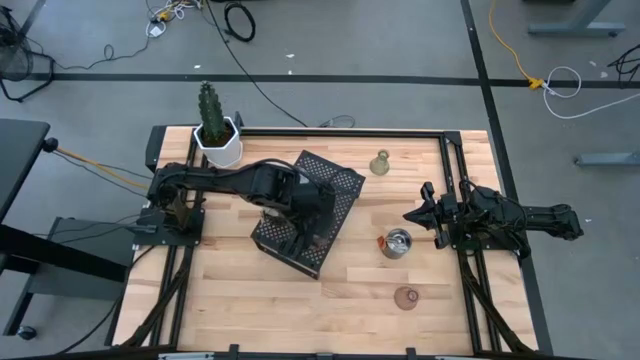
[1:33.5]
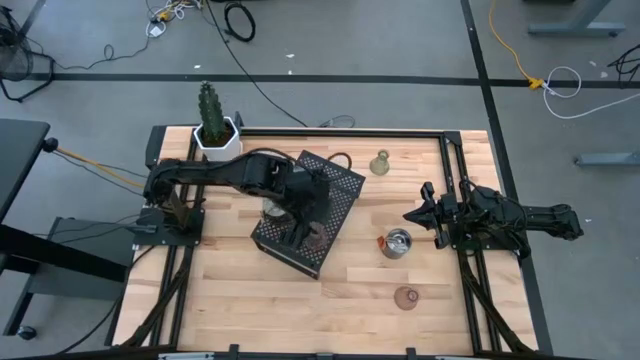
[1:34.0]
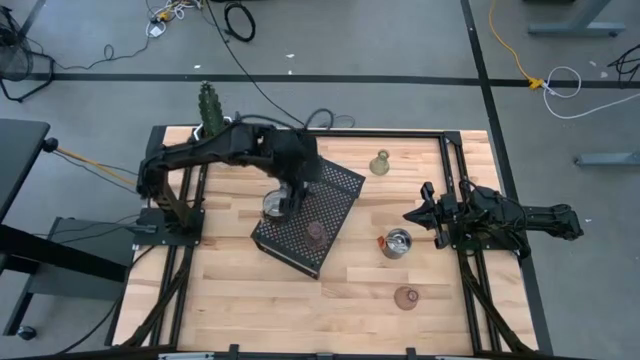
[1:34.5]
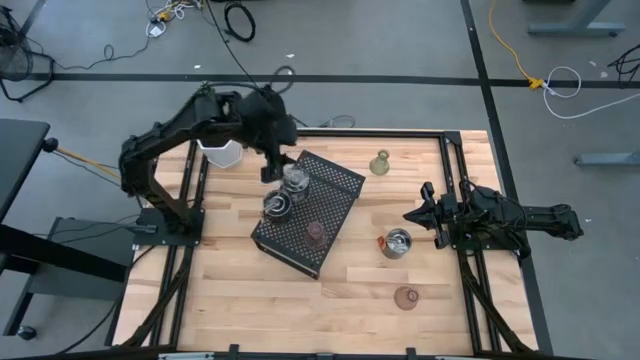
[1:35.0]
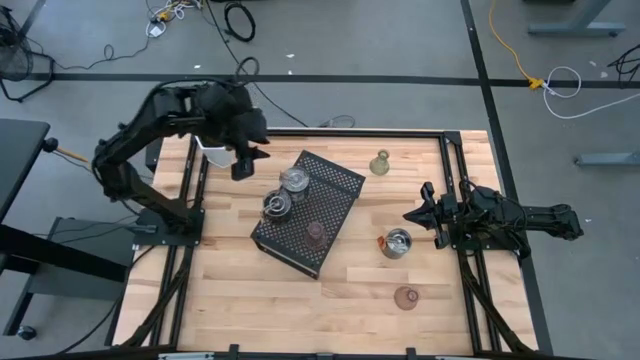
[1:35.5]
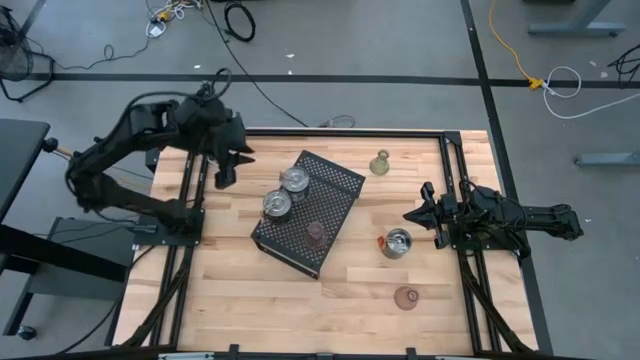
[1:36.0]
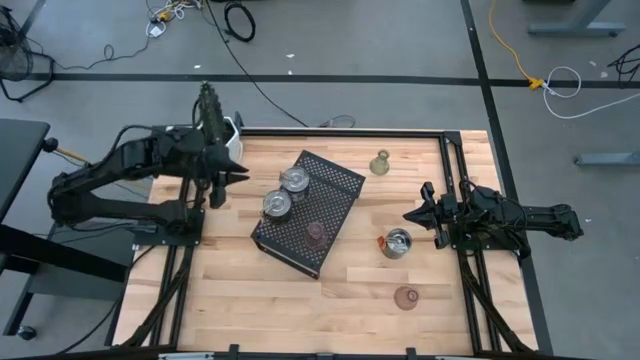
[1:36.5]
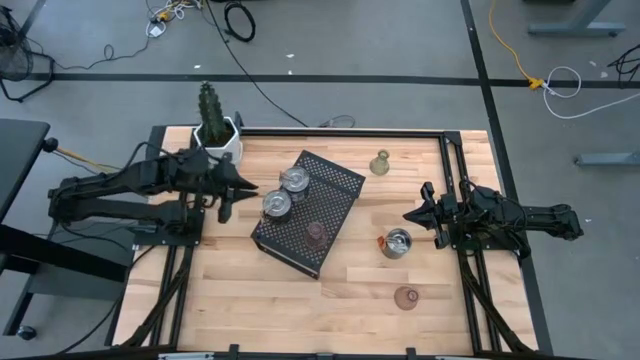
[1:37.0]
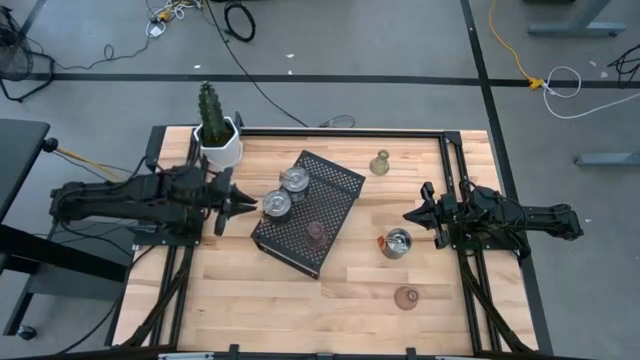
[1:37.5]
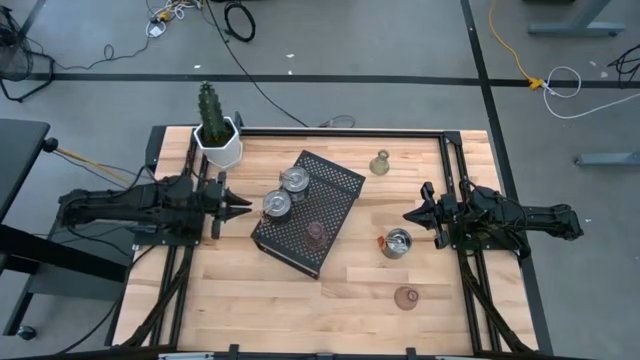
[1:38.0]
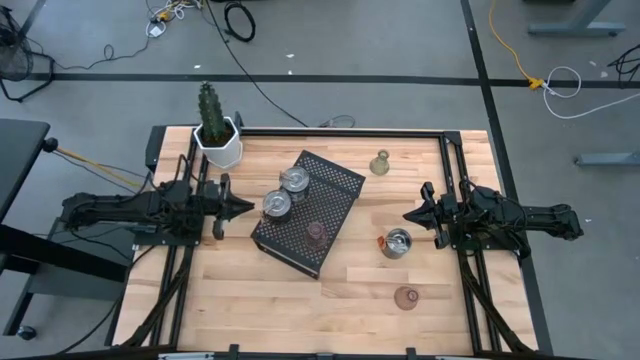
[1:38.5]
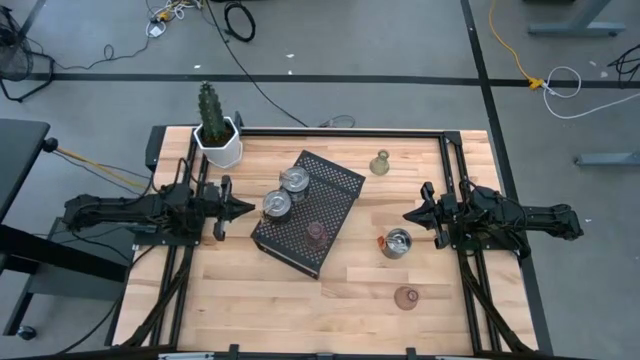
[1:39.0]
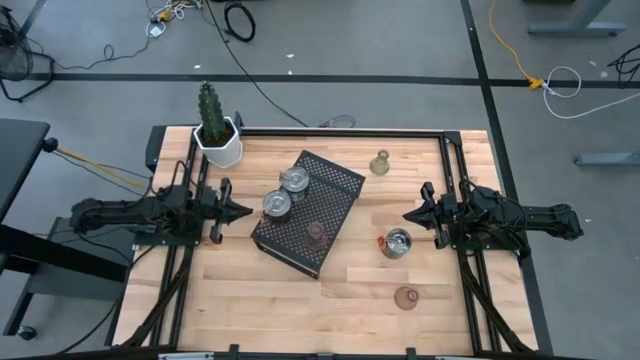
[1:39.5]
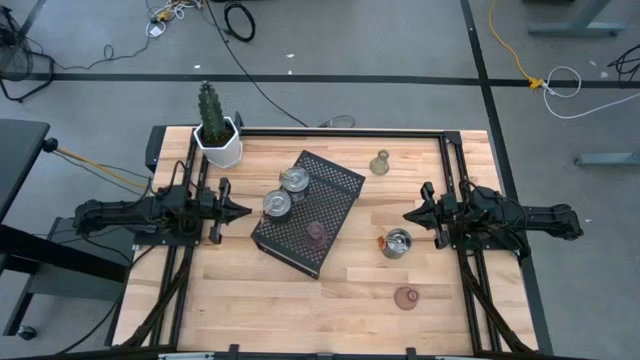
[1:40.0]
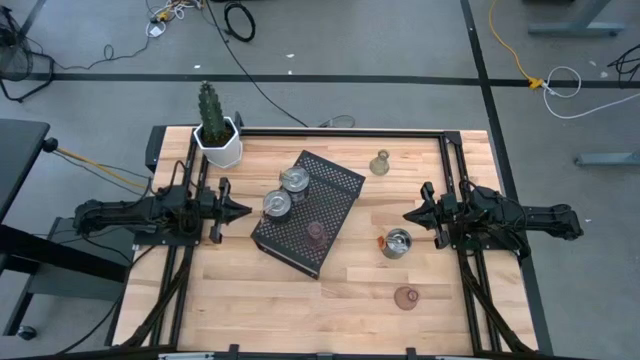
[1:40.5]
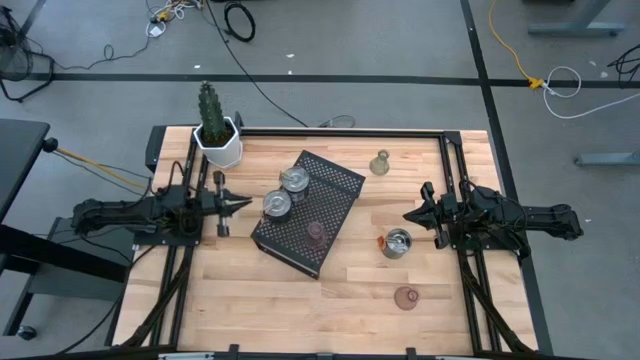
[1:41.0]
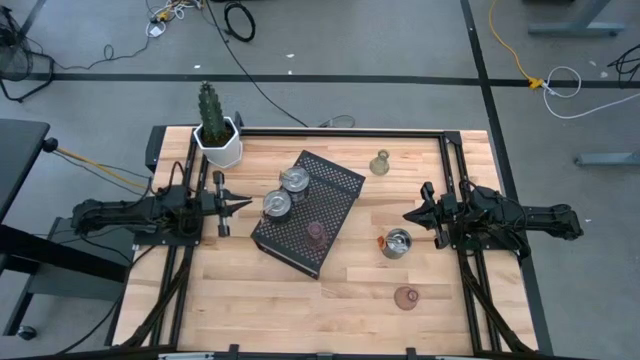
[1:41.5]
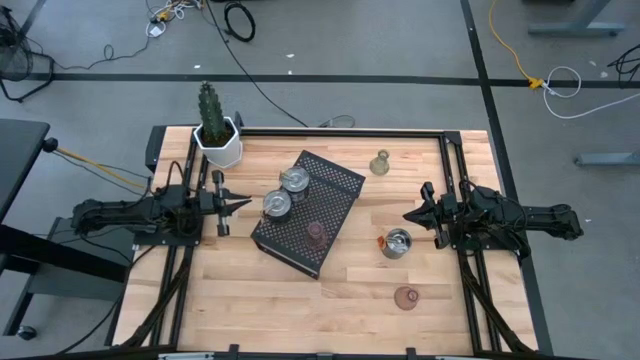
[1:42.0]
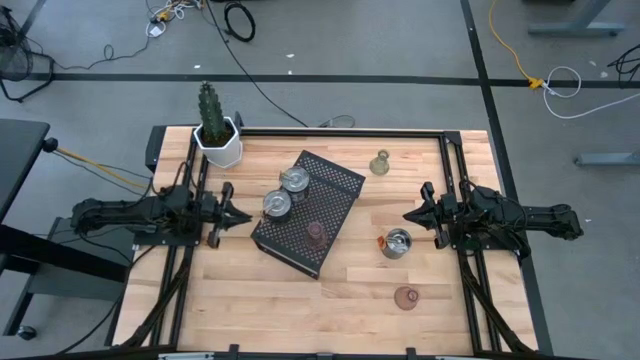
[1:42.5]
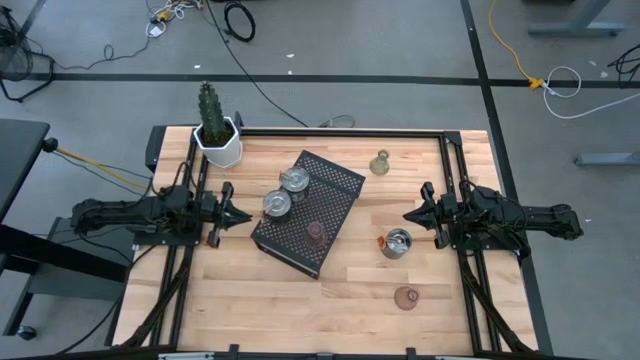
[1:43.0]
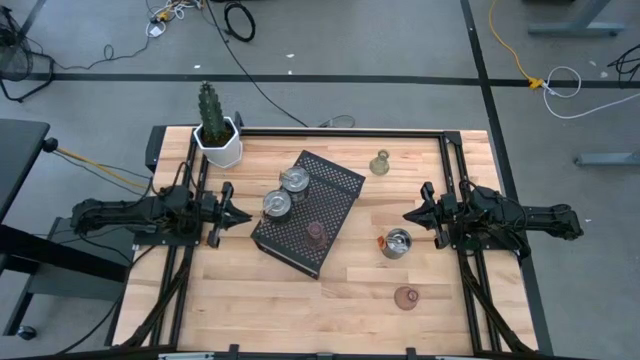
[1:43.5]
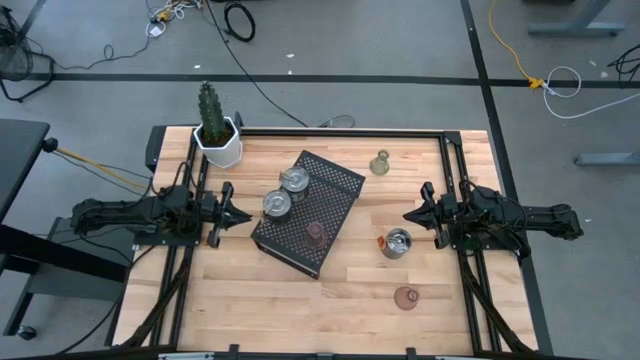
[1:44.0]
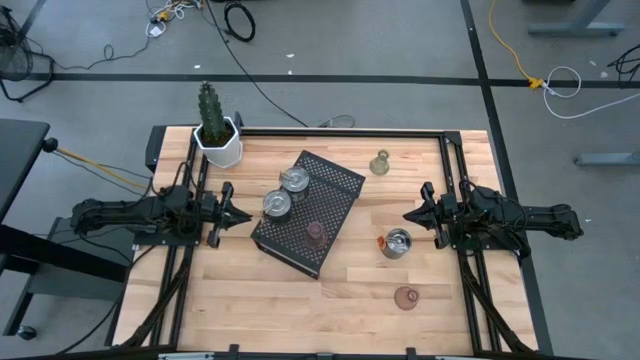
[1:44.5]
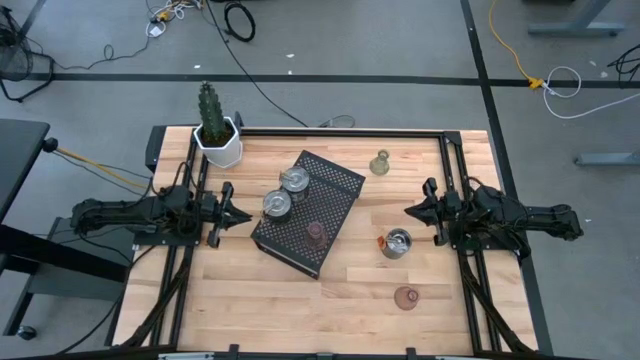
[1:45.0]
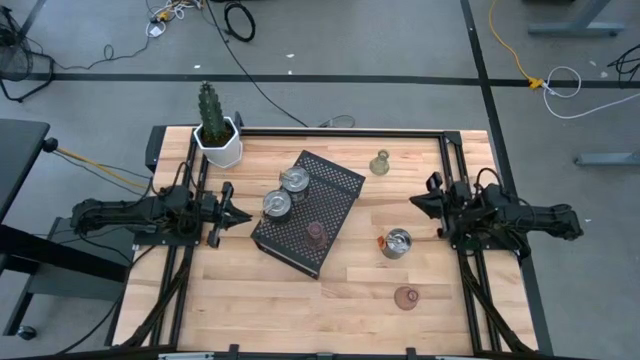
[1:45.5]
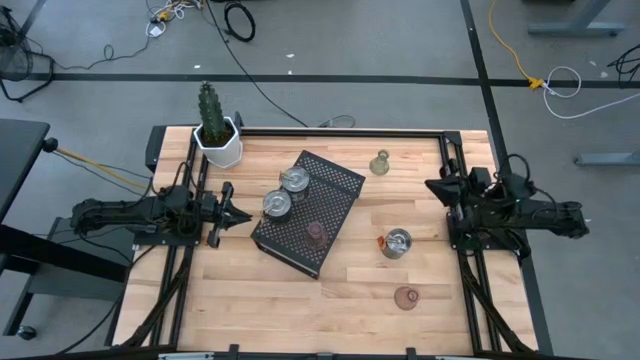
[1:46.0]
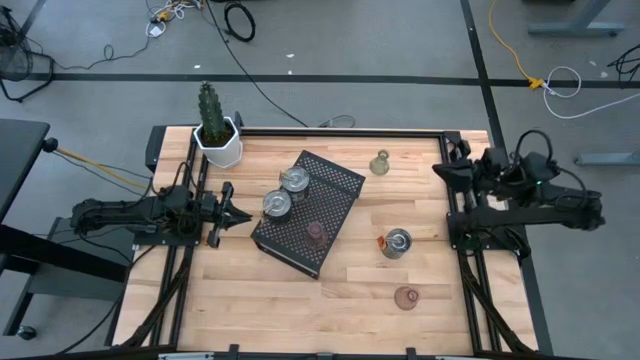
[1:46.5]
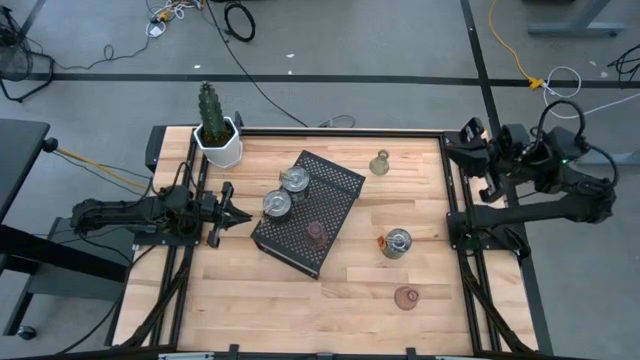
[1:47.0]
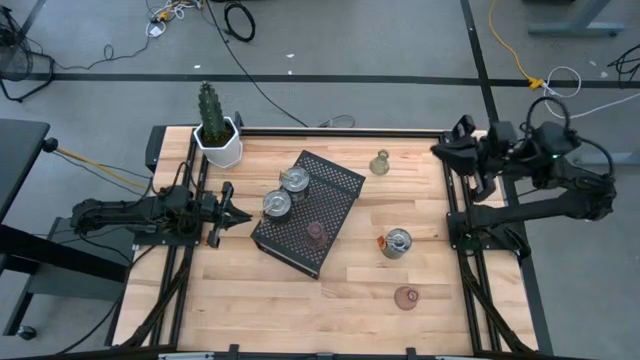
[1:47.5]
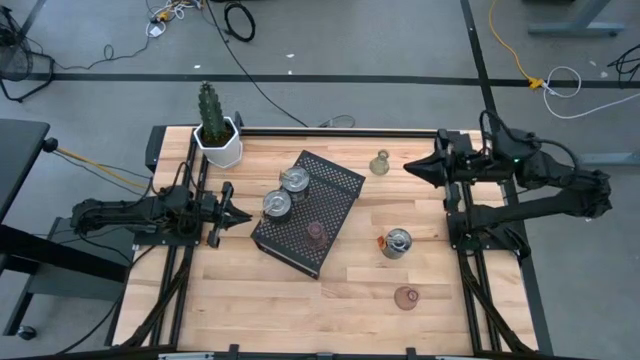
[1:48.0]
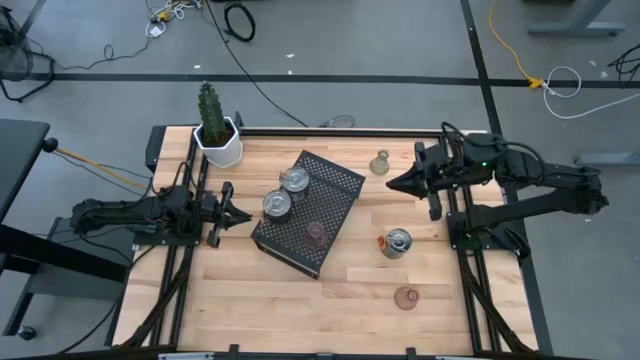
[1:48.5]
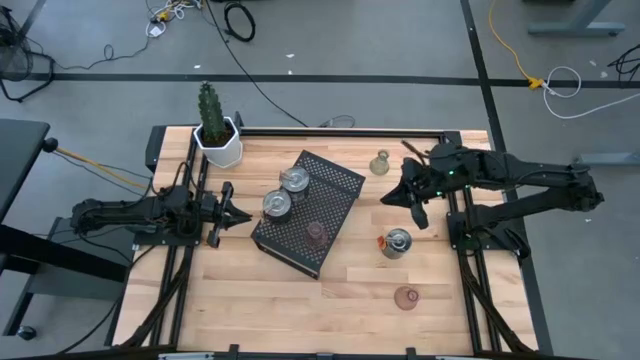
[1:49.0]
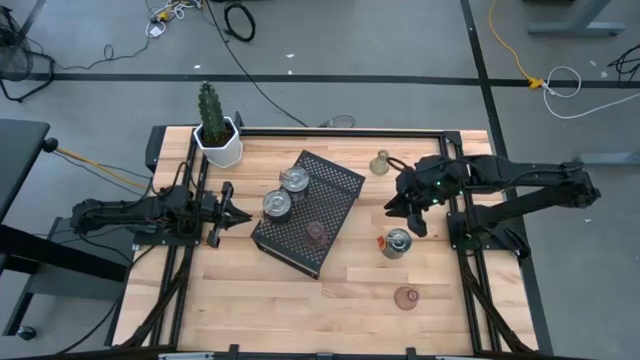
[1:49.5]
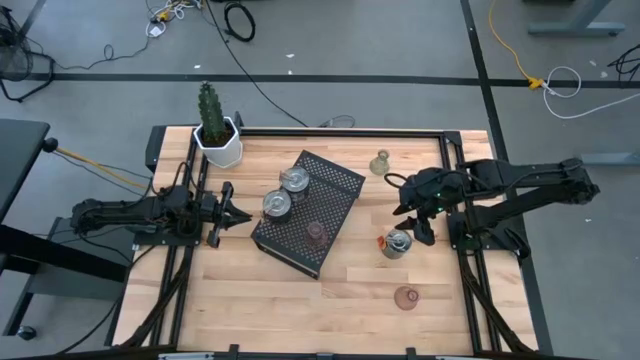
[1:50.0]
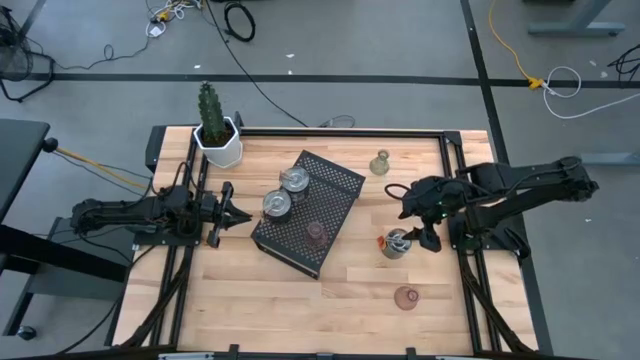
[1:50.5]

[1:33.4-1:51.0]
Task: Pick & Place candle stick holders
Put the silver scented candle on the shelf

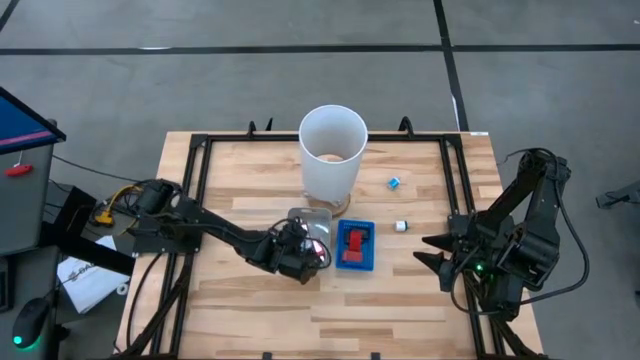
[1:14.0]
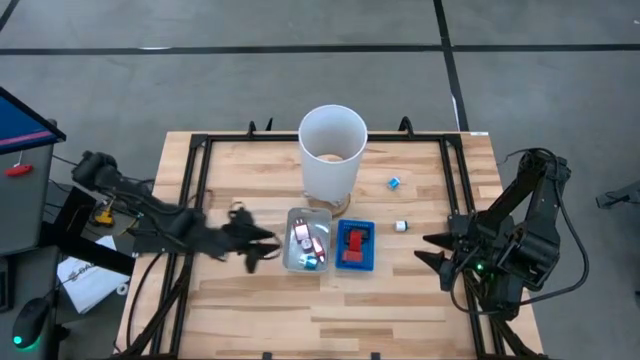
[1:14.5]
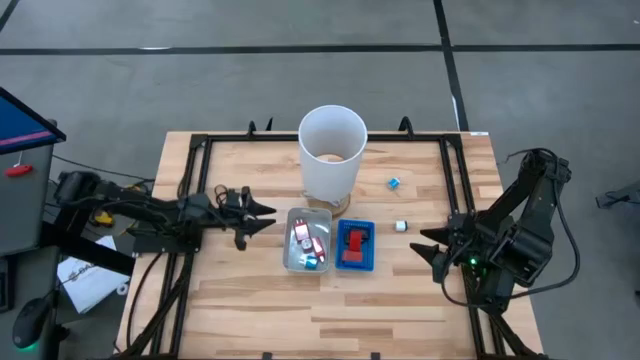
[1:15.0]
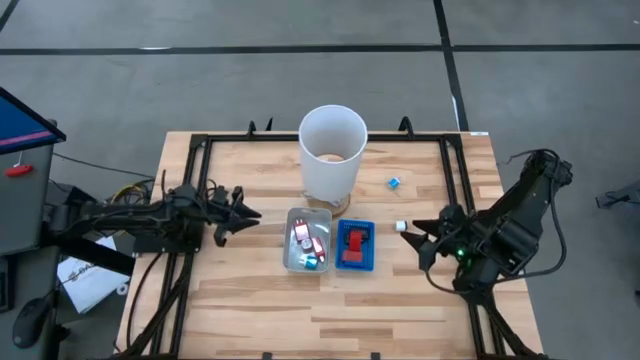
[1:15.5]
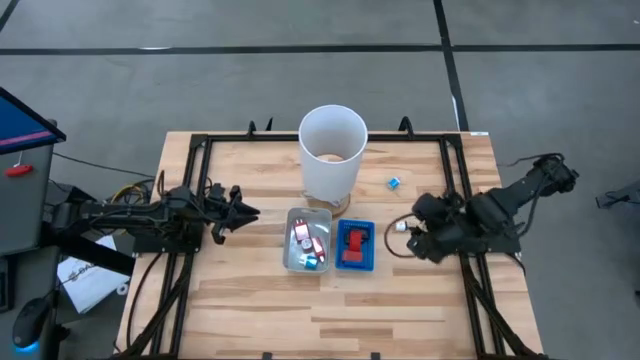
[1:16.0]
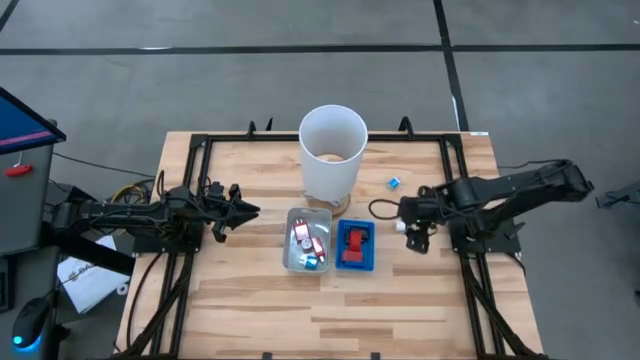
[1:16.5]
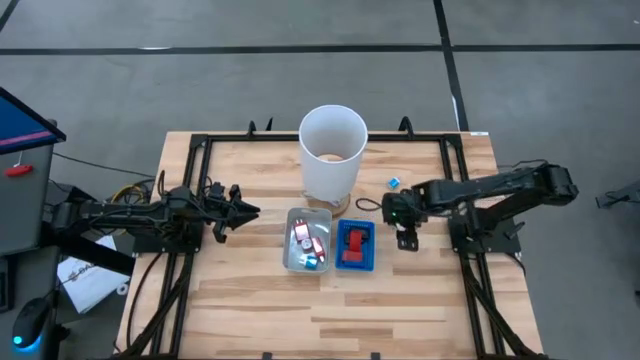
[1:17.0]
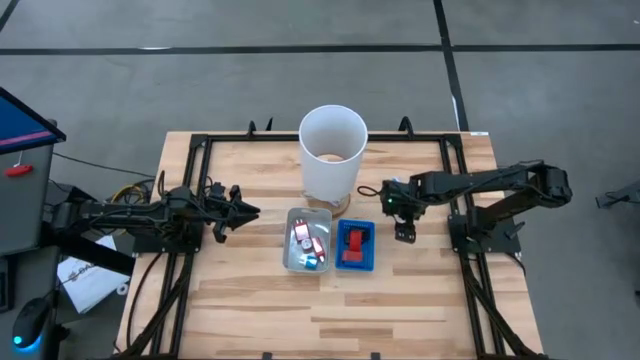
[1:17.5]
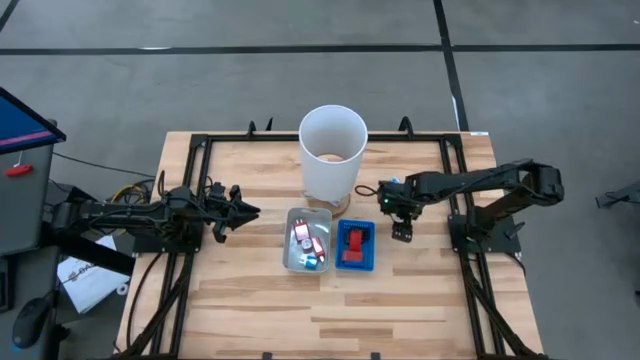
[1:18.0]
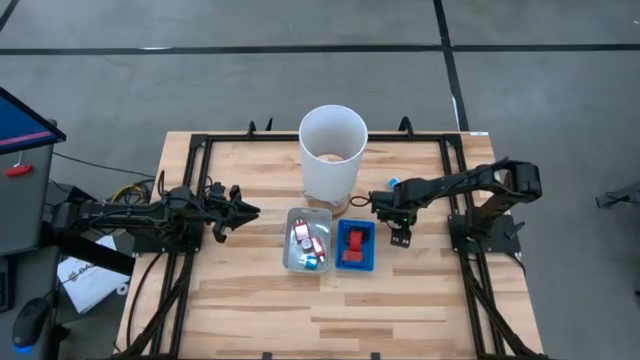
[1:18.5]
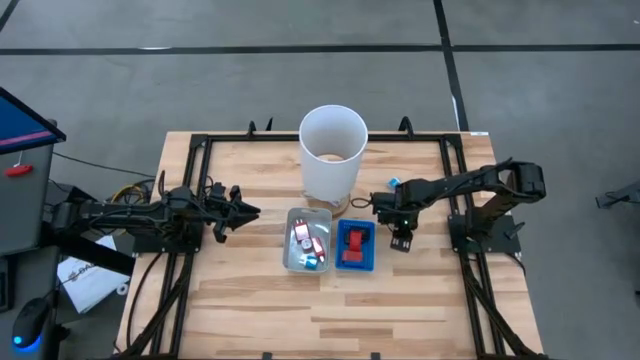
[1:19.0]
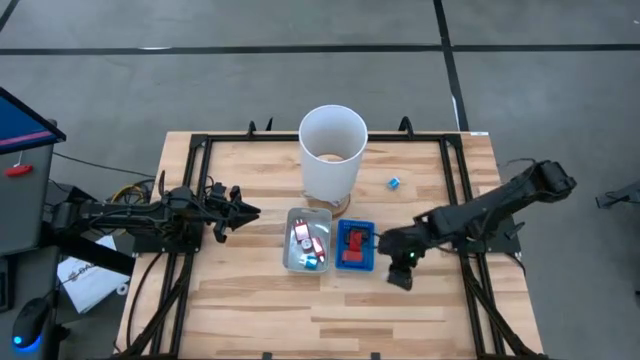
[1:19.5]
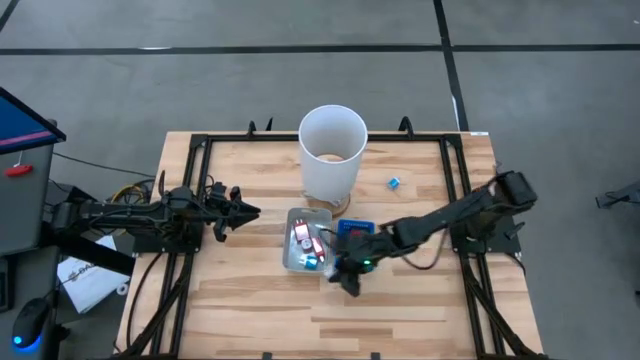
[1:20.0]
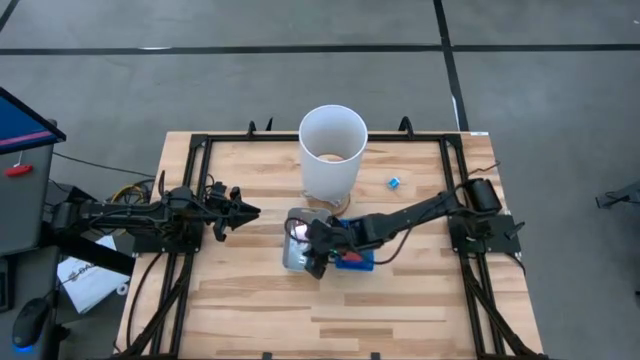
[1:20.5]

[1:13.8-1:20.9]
Task: Pick & Place Office items
Put the white charger adapter into the gray bin
